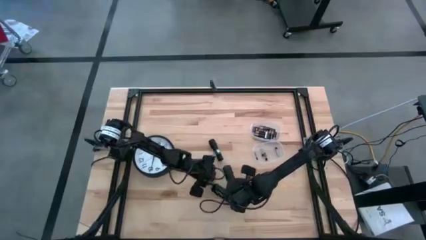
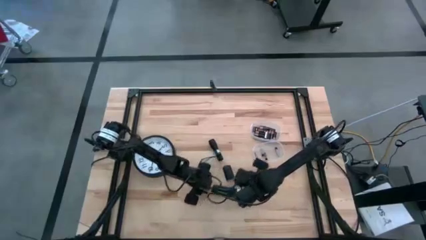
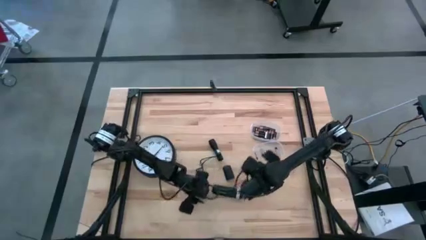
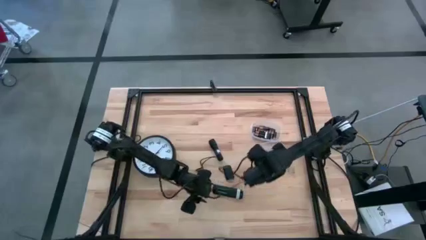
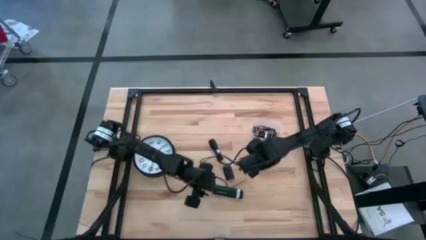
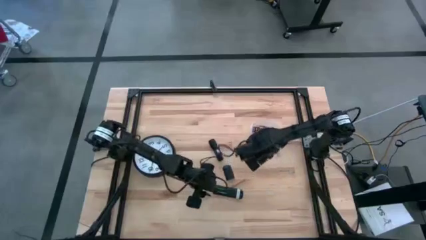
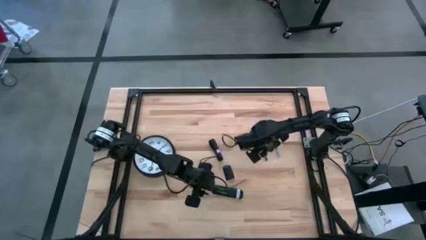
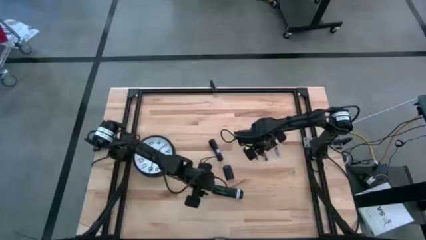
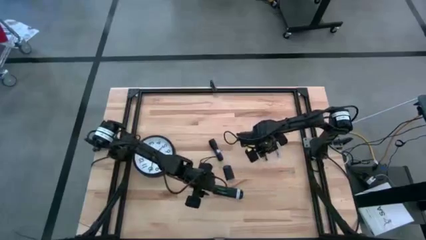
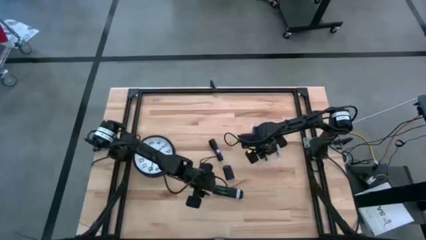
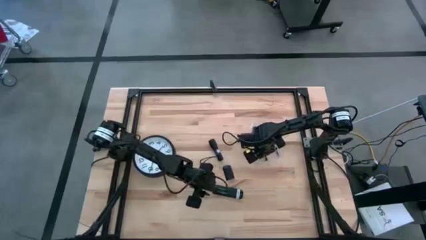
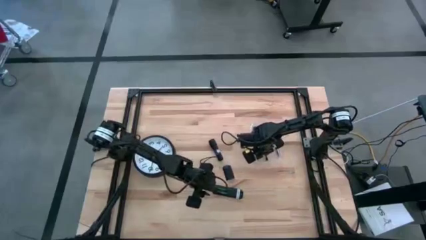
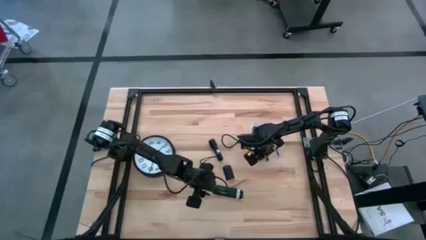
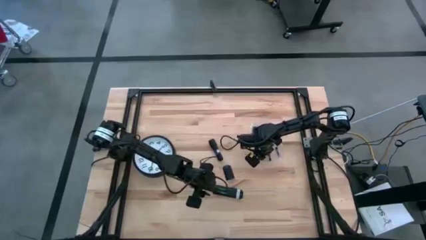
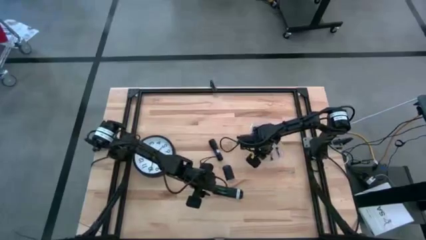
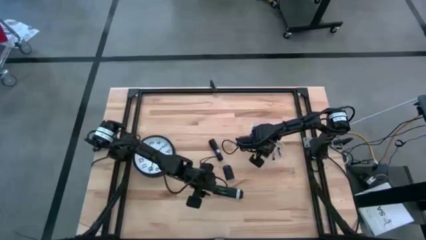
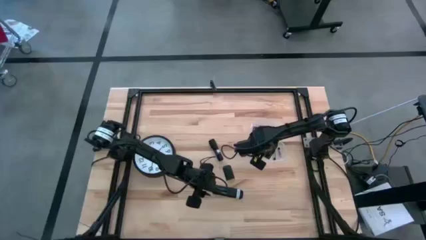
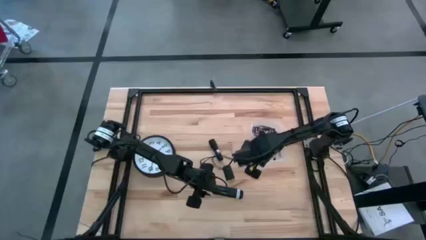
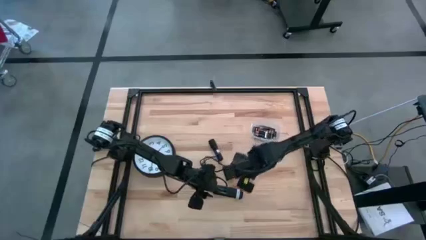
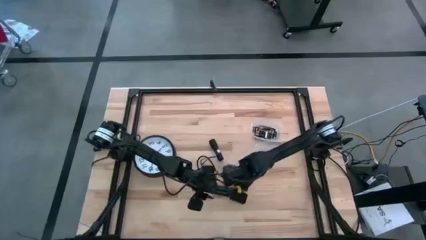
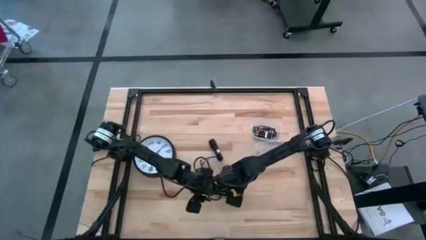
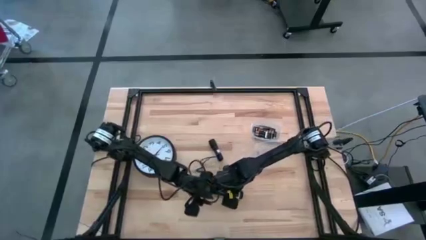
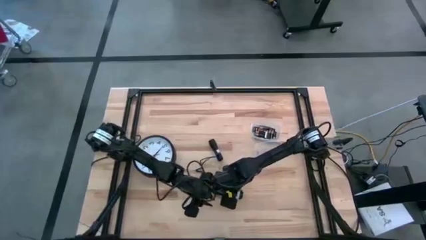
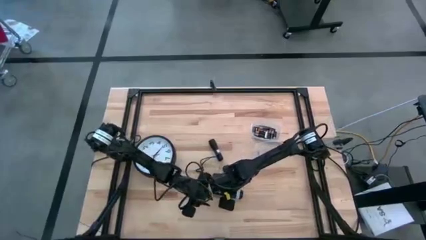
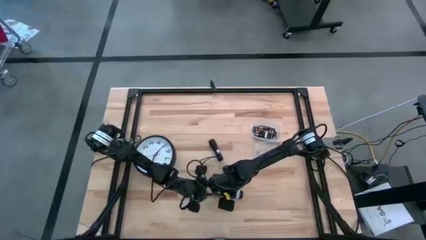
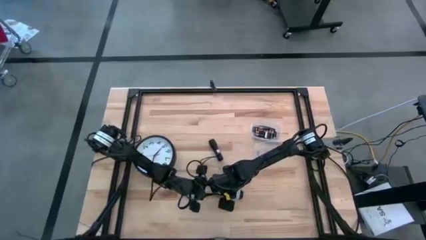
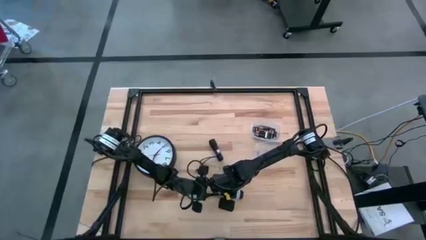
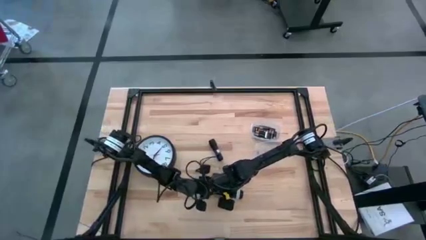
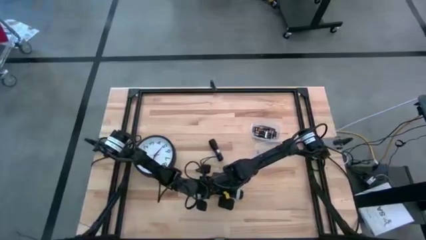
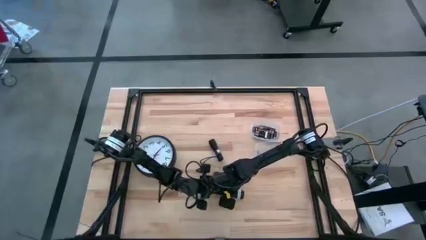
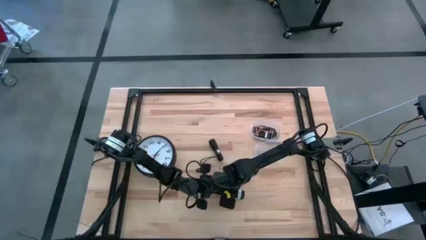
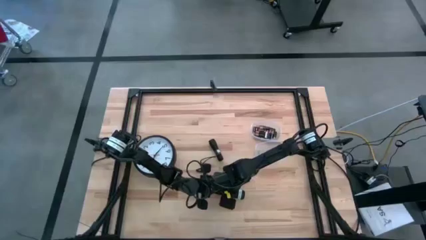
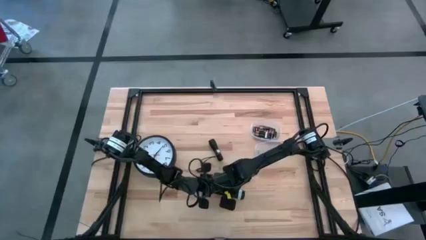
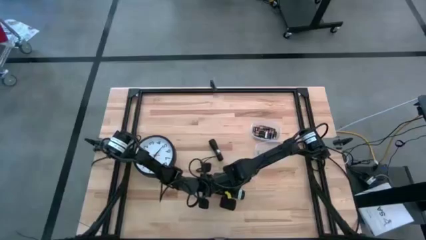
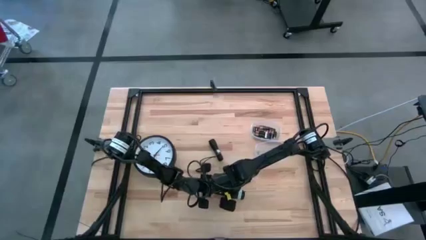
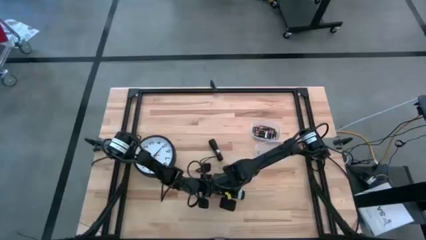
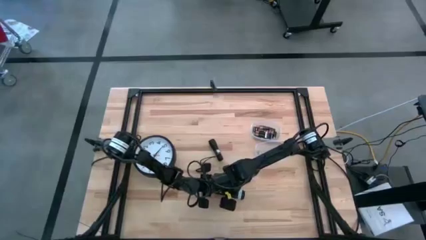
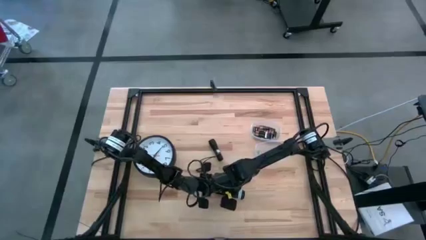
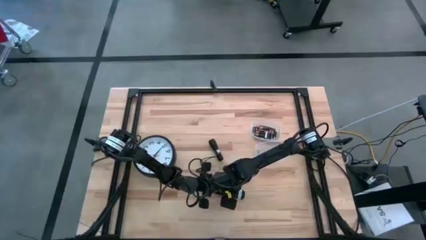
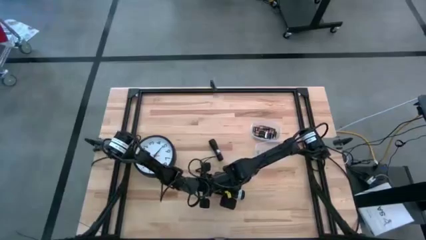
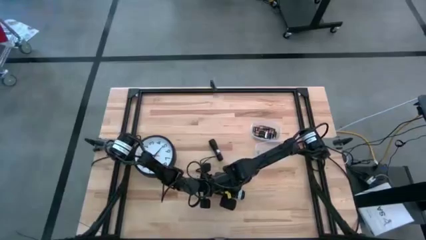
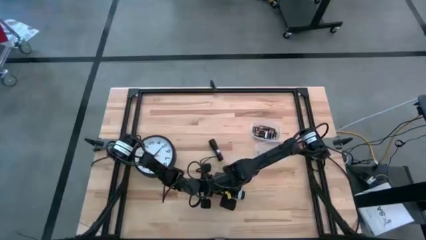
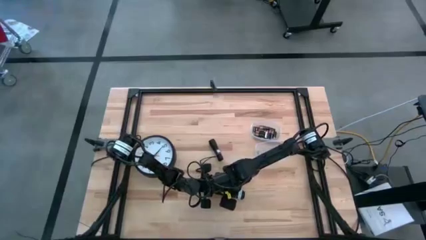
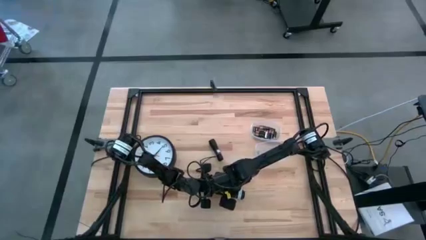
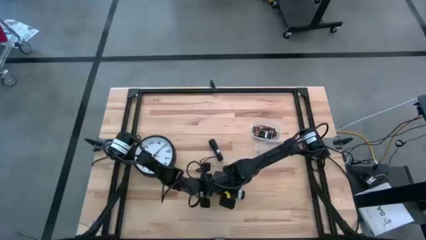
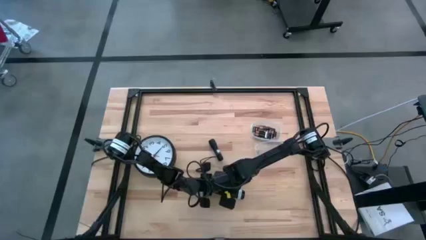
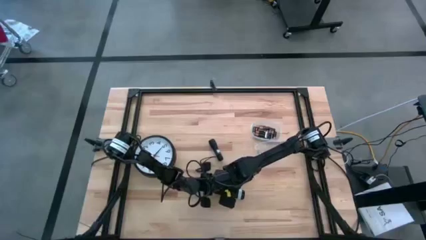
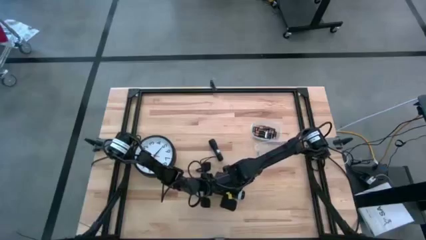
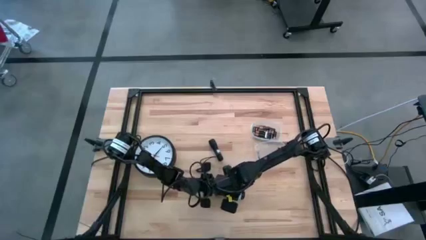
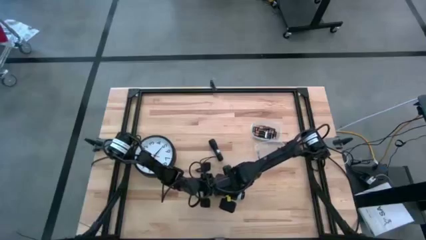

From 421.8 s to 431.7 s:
Task: Insert battery
Insert the silver battery into the remote battery compartment

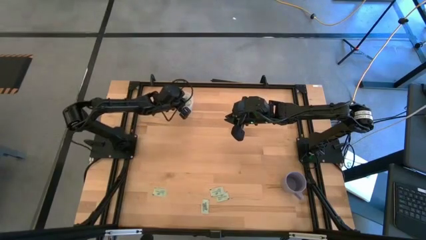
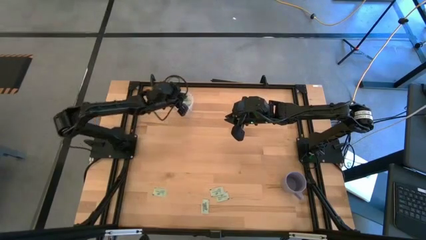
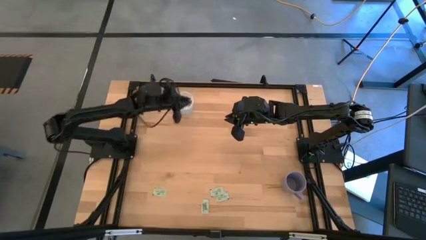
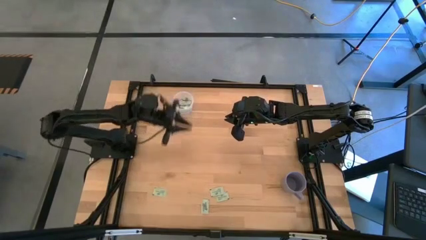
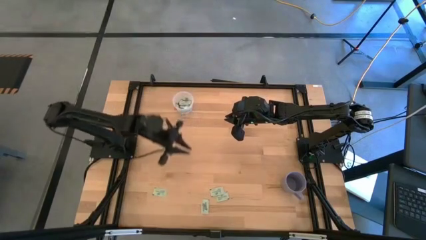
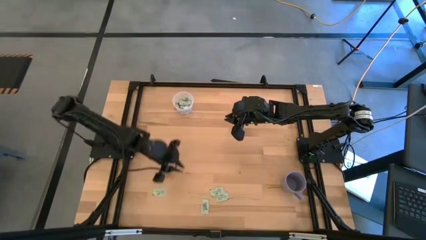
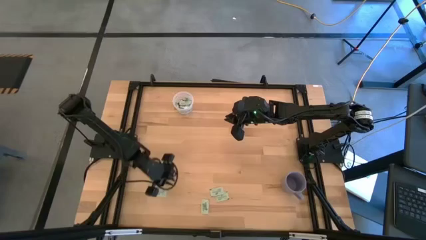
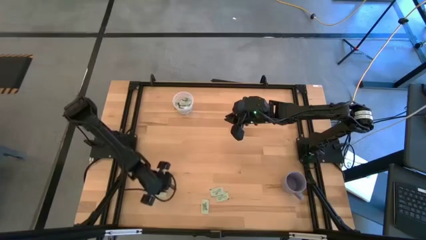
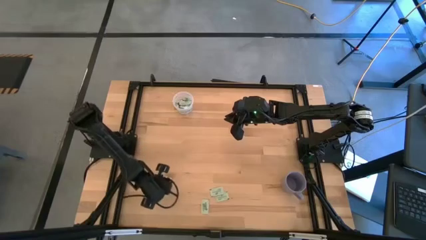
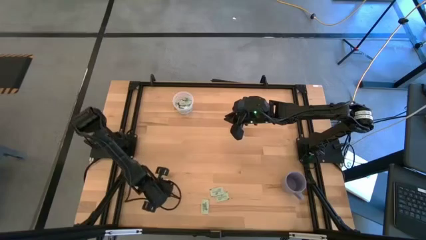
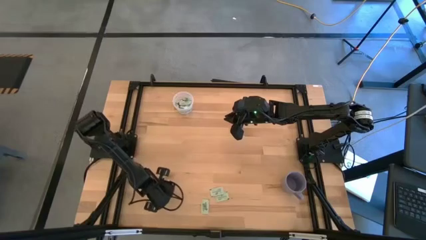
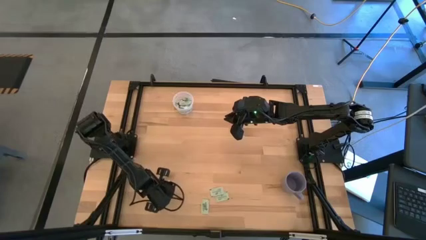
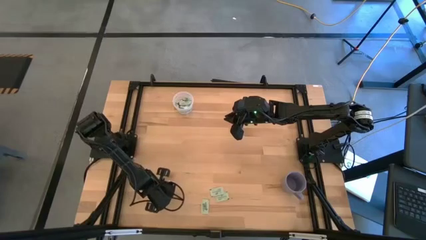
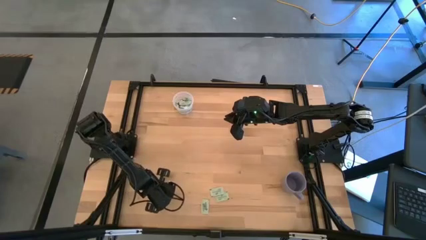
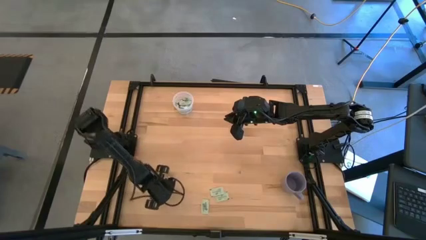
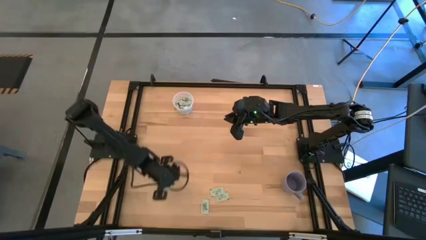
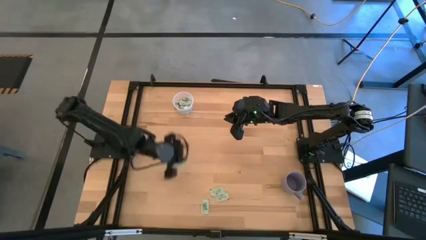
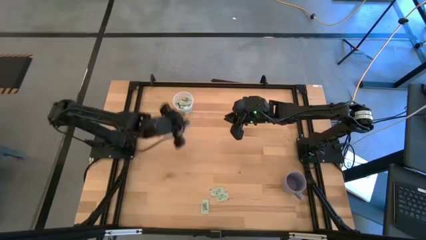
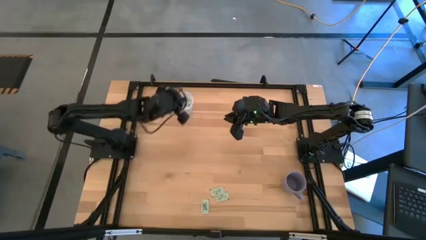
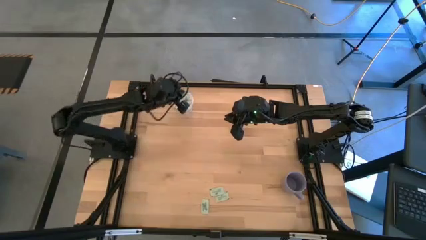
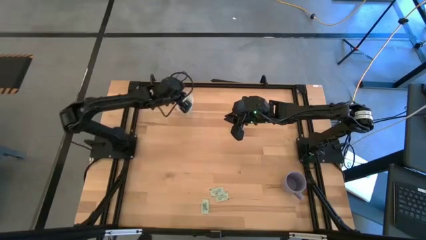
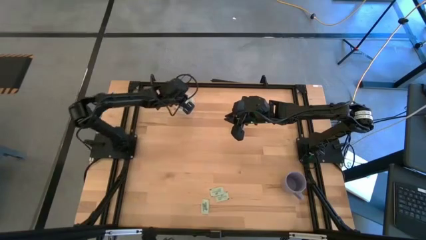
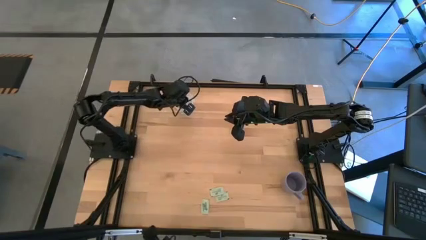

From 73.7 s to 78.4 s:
Task: Pick and place items into bin
Put the stevia packet into the transparent bin

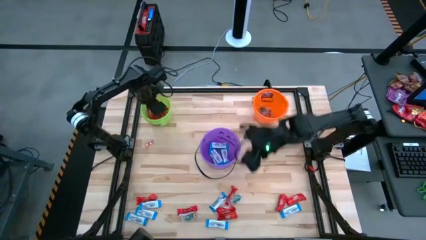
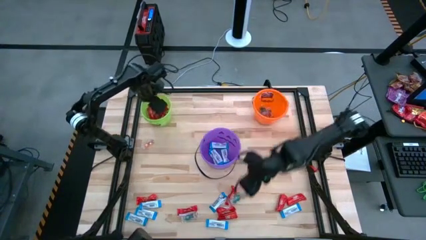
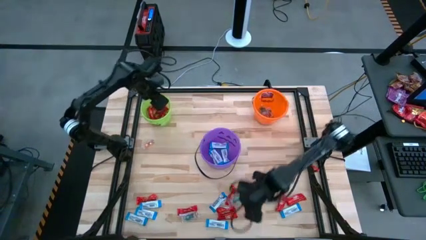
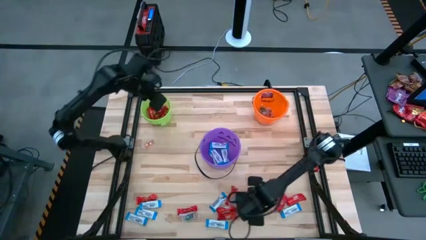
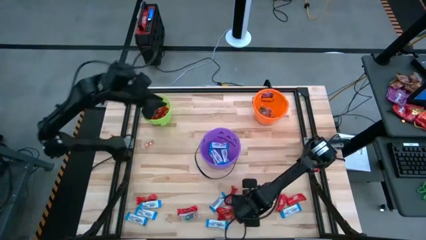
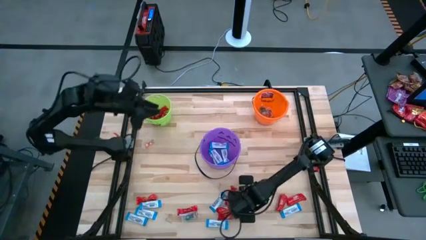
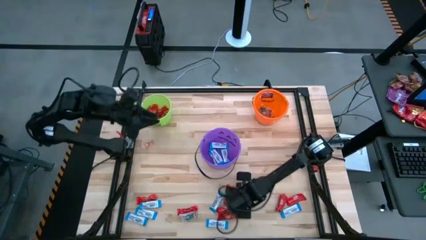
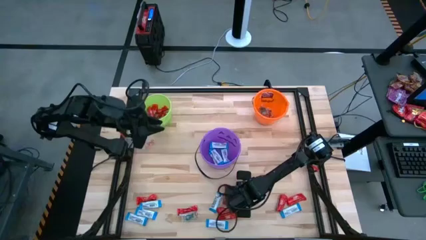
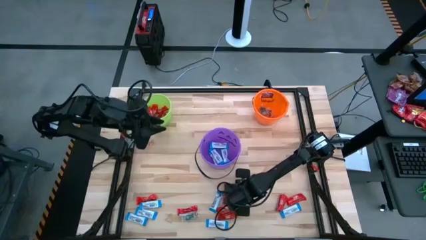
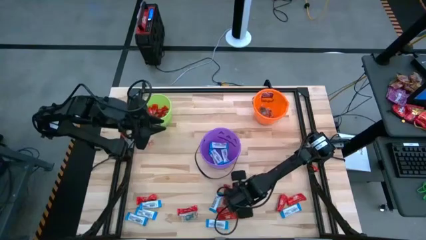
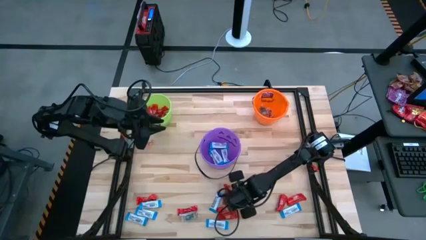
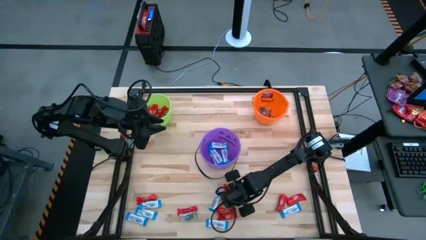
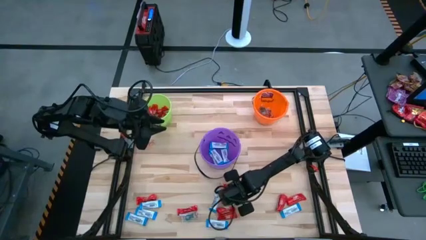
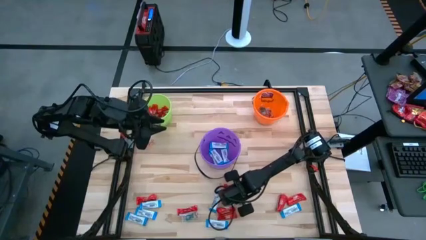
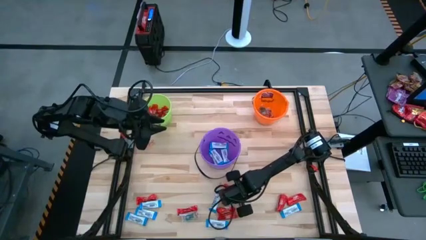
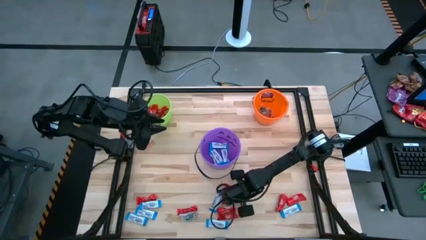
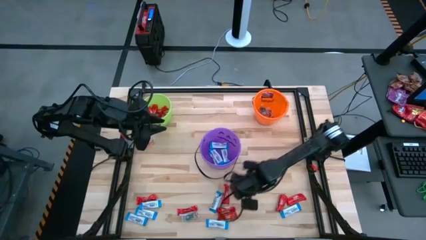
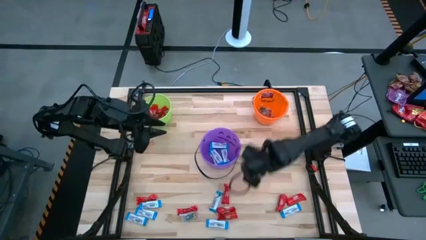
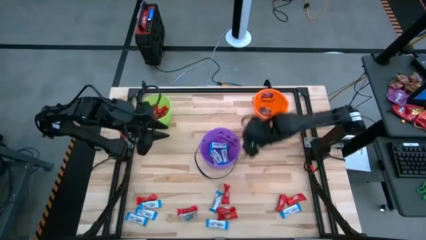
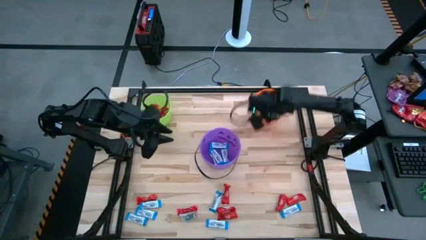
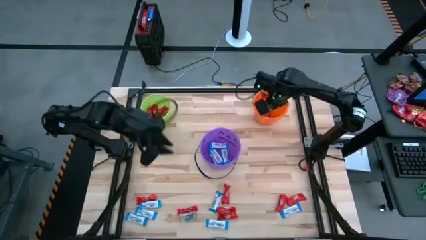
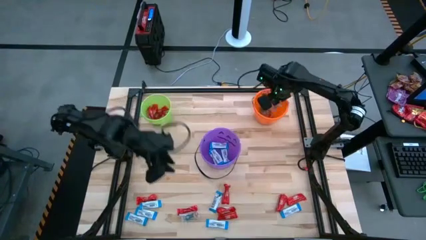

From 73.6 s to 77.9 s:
Task: Sort candy by brand, put in halloween buckets
Put the blue gummy into the orange bucket
